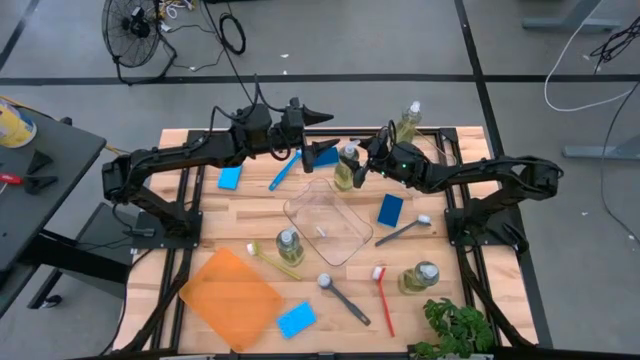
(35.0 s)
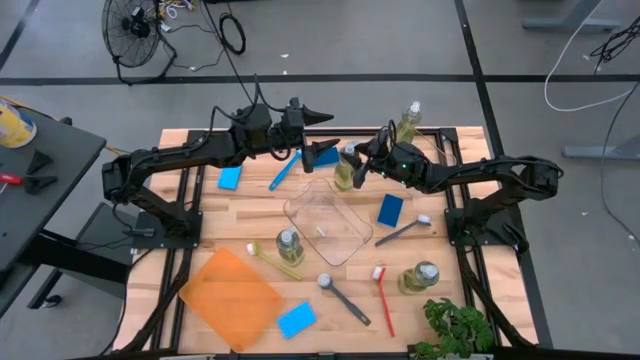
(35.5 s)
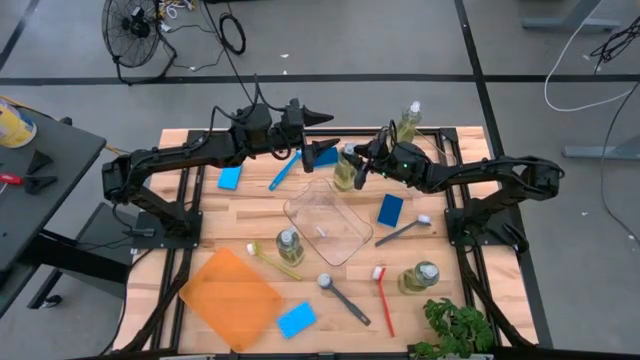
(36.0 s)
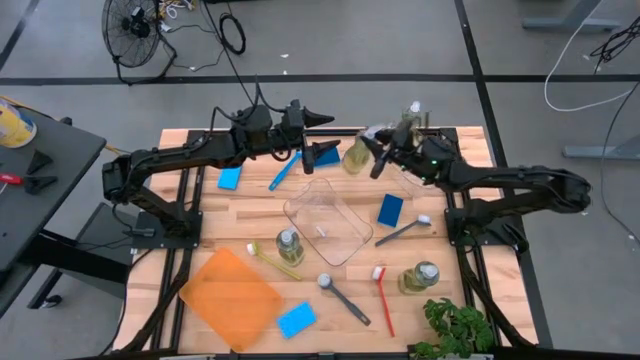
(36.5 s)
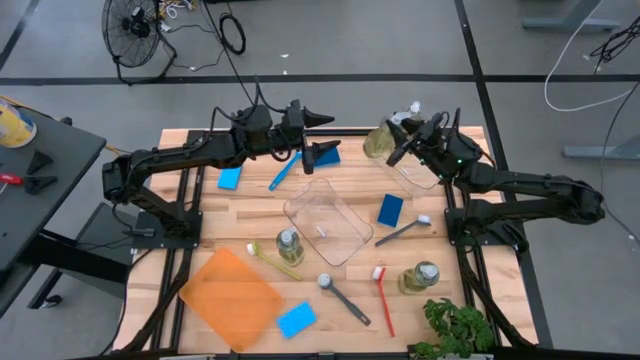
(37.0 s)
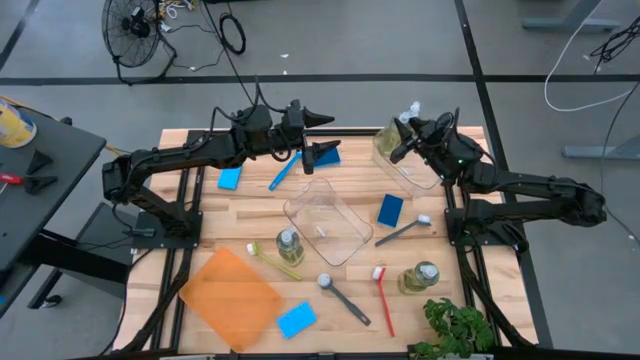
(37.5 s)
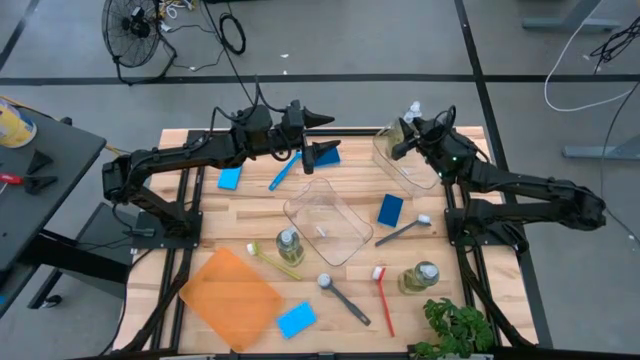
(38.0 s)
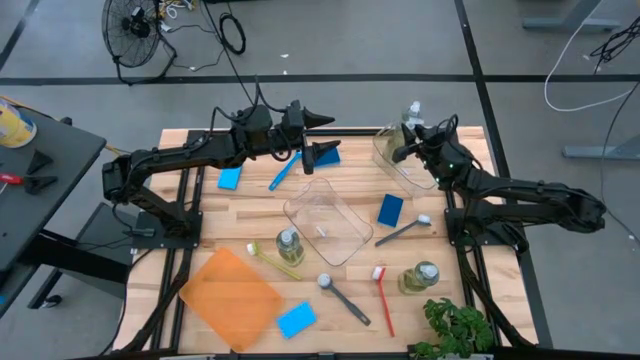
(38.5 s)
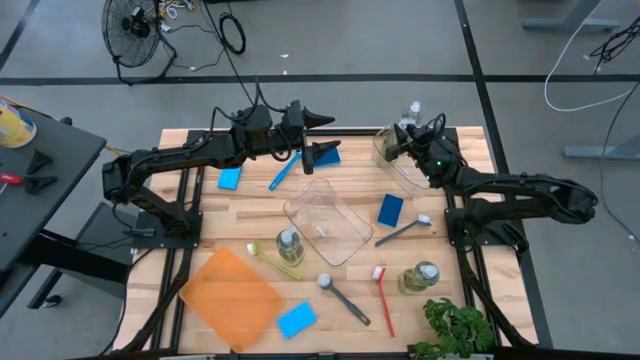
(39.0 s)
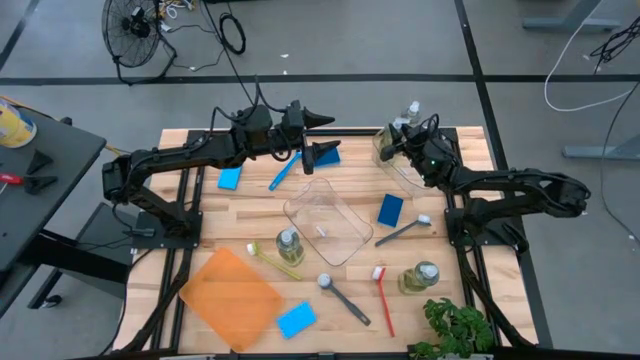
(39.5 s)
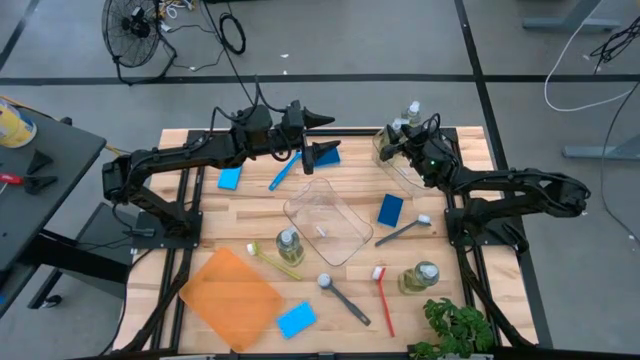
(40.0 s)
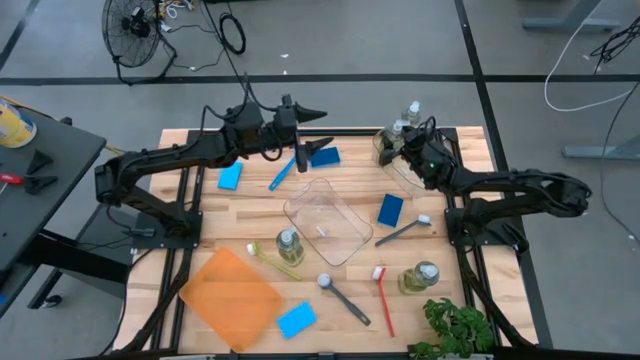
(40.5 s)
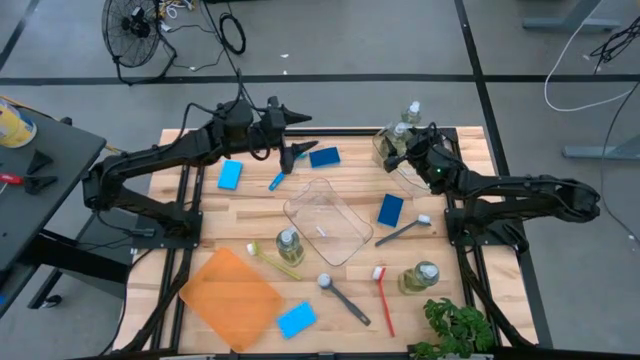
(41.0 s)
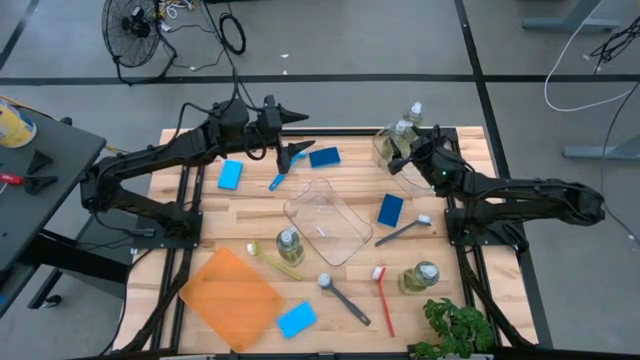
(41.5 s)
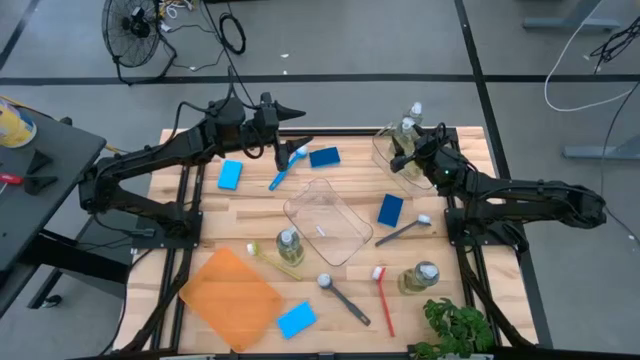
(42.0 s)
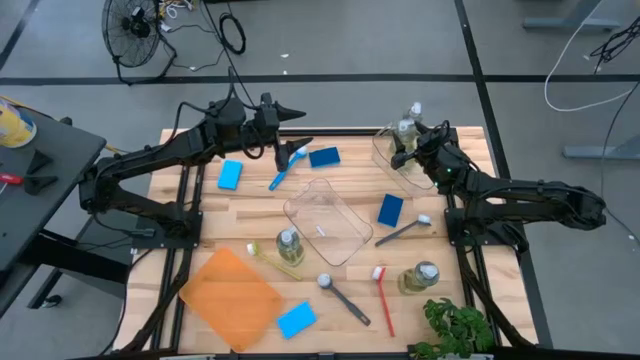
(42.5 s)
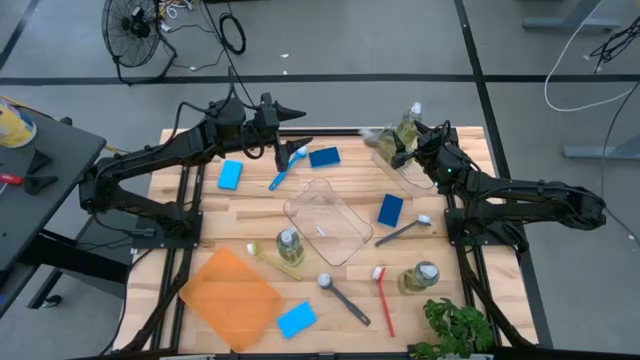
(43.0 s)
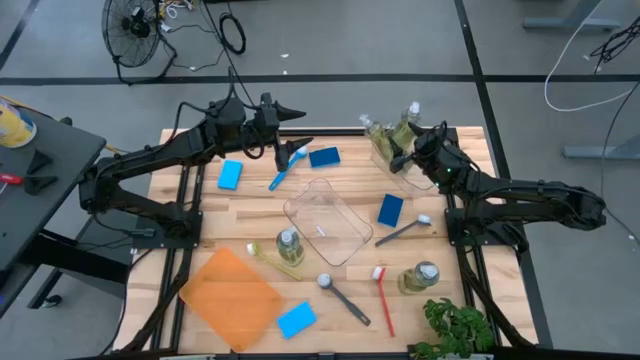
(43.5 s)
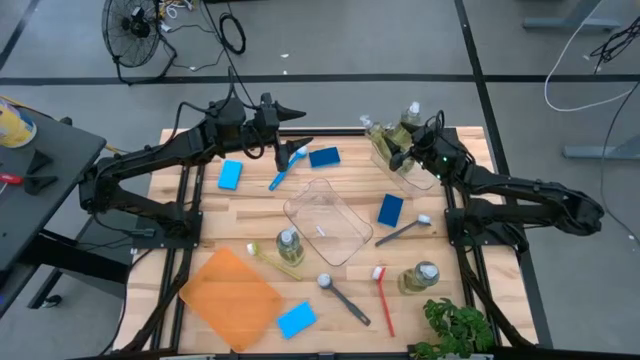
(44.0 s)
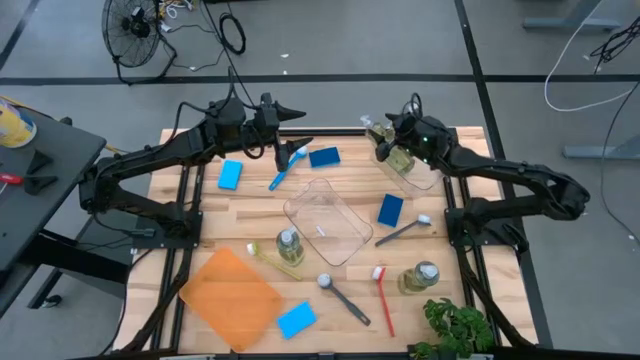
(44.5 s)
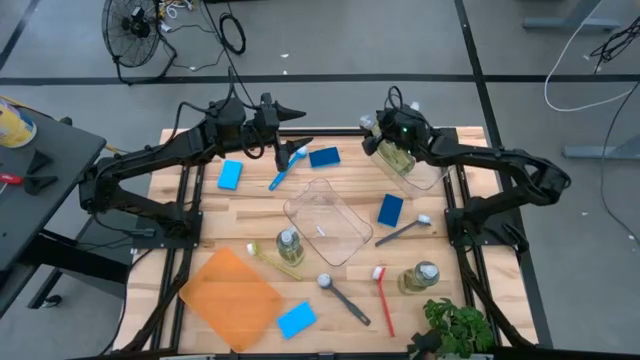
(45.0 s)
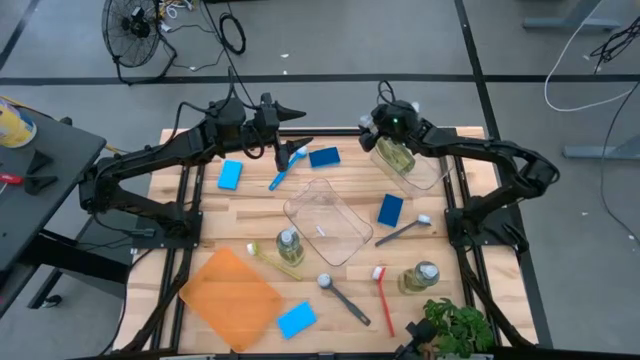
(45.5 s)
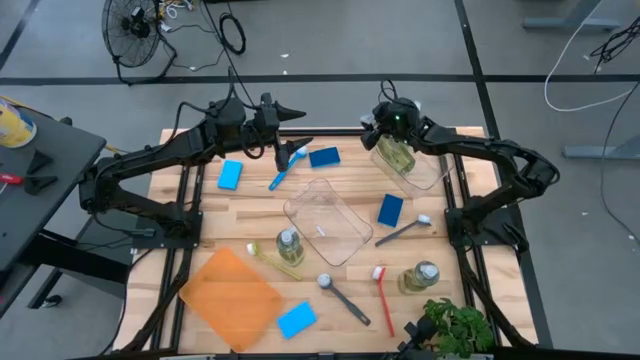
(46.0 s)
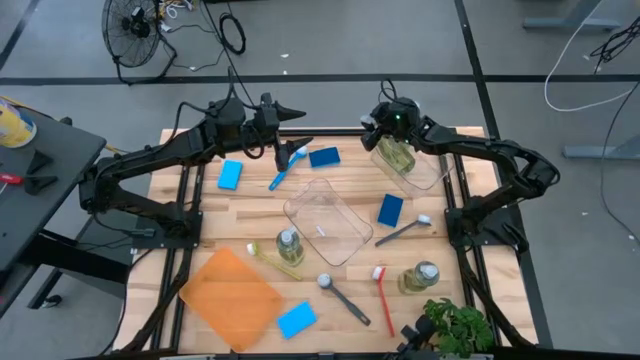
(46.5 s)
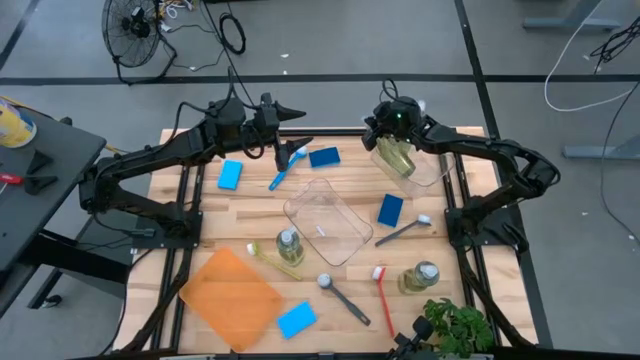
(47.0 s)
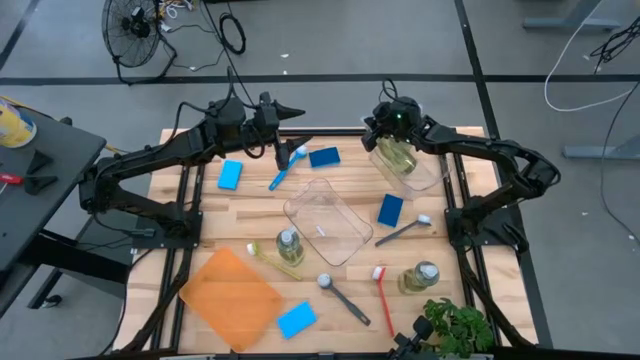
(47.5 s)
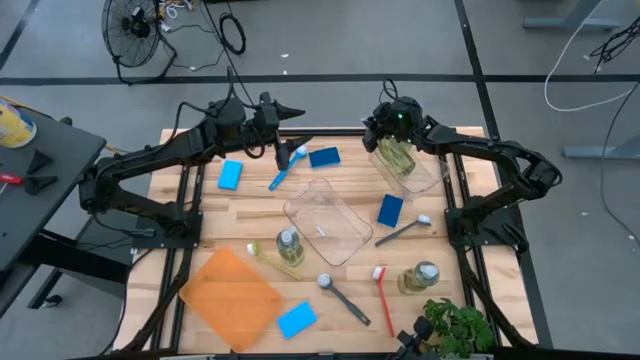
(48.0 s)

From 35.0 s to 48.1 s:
Task: Pick & Place Kitchen Sink Supplies
Put the yellow dish soap into the top transparent bin

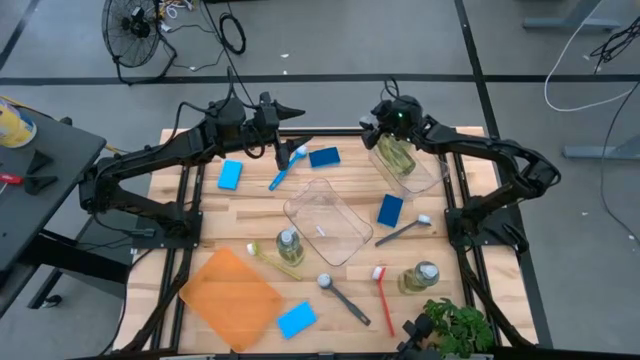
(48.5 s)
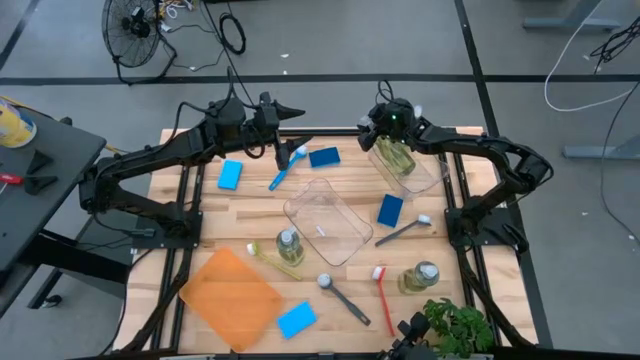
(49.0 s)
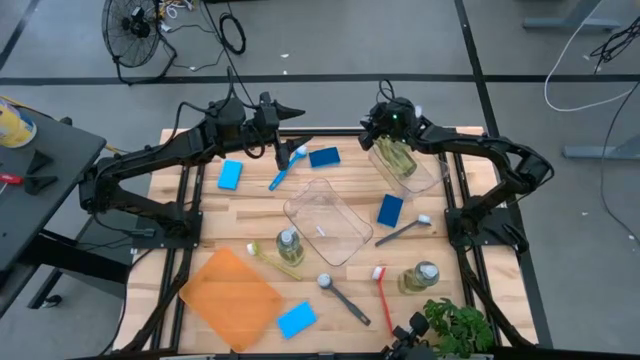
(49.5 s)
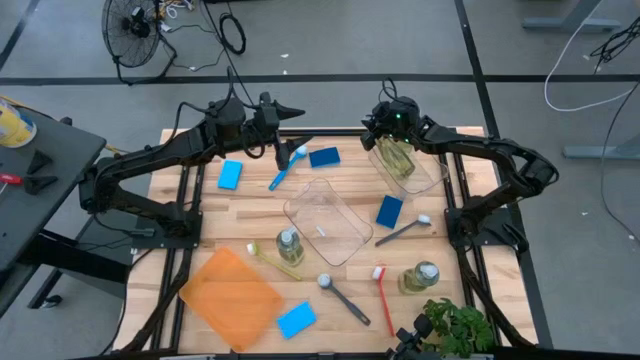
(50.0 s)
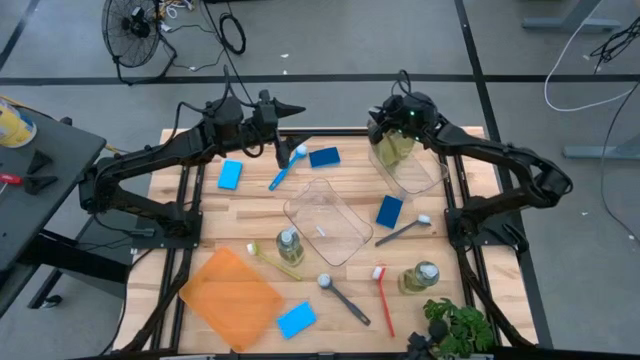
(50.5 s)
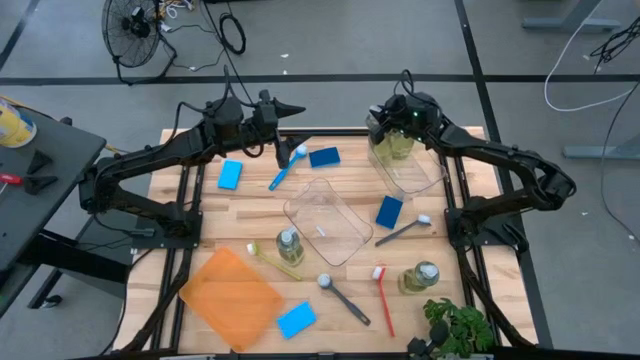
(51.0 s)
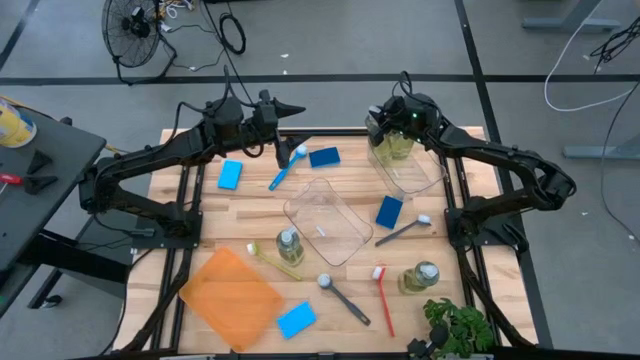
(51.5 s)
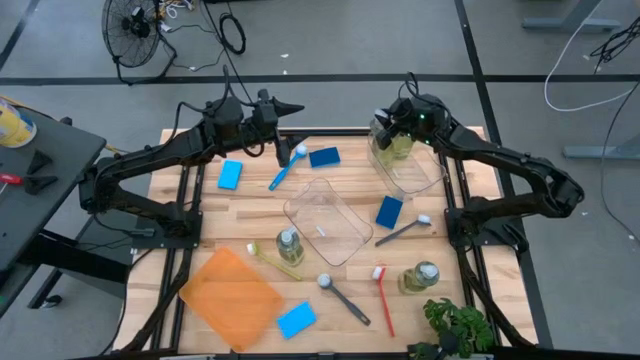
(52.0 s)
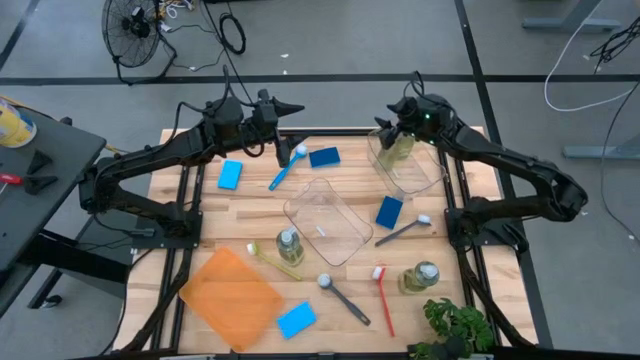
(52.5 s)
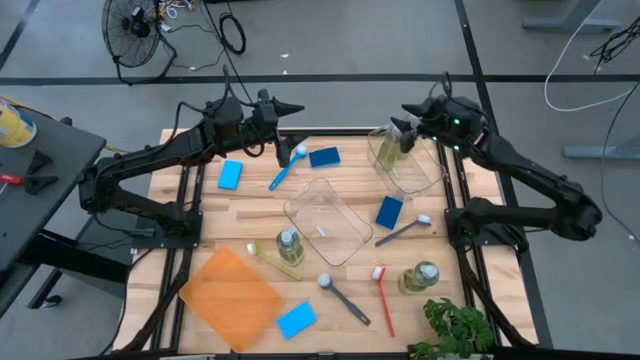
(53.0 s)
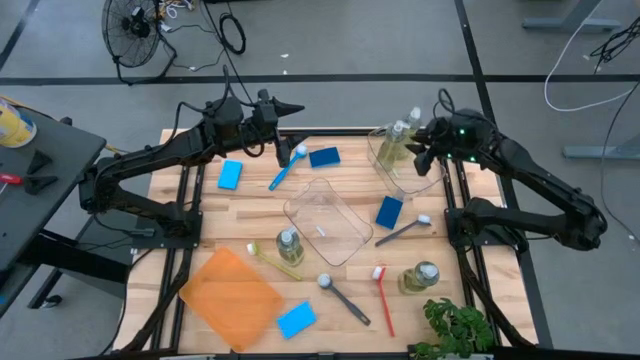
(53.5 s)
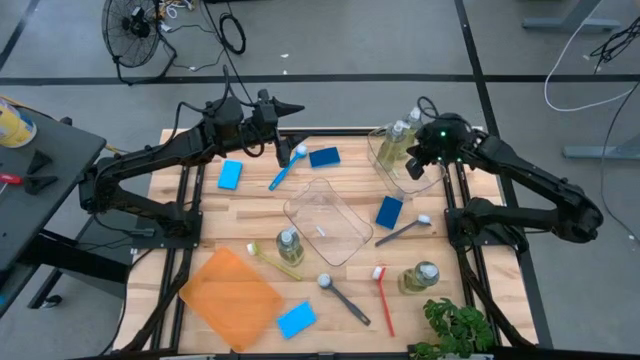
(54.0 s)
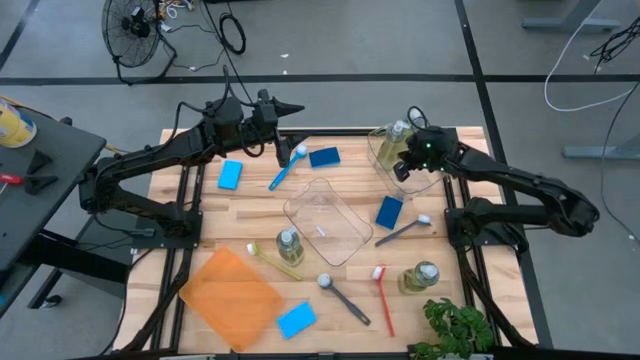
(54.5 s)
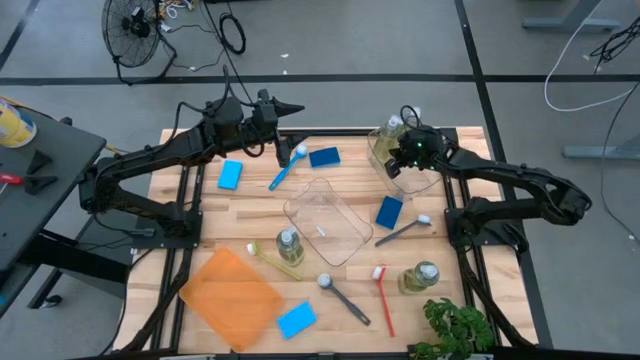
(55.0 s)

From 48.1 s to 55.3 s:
Put the yellow dish soap into the top transparent bin

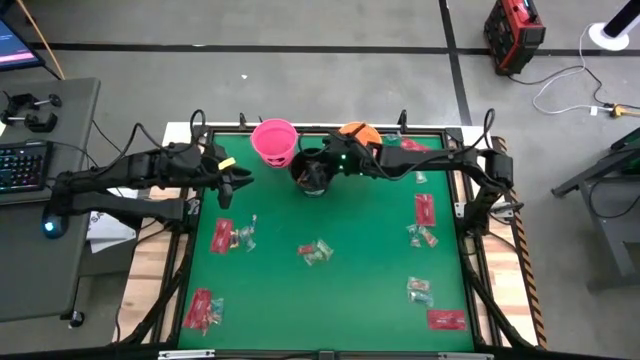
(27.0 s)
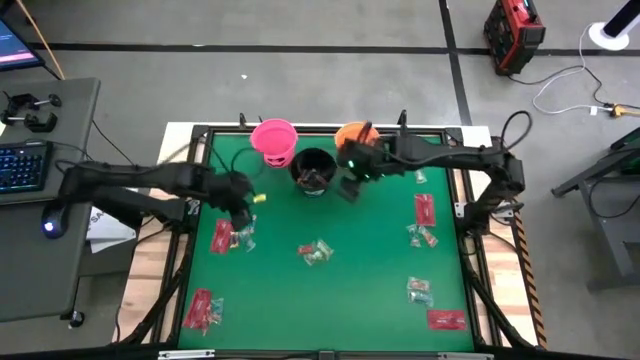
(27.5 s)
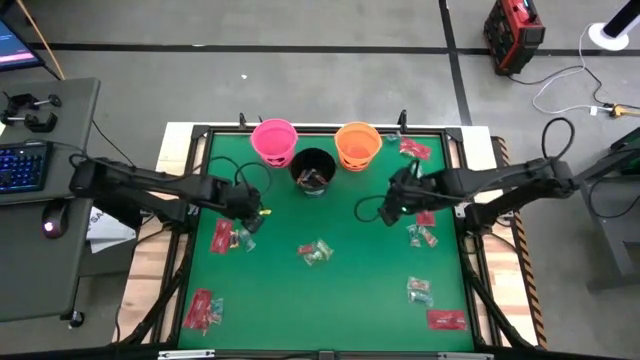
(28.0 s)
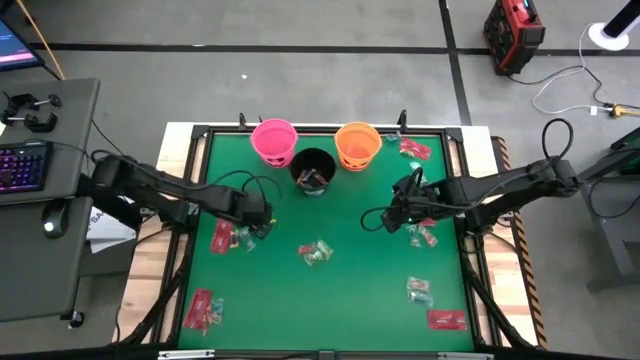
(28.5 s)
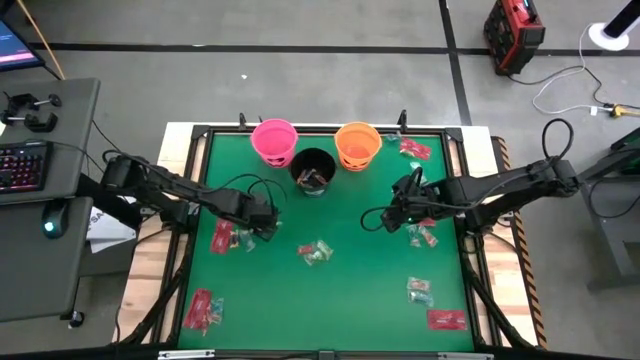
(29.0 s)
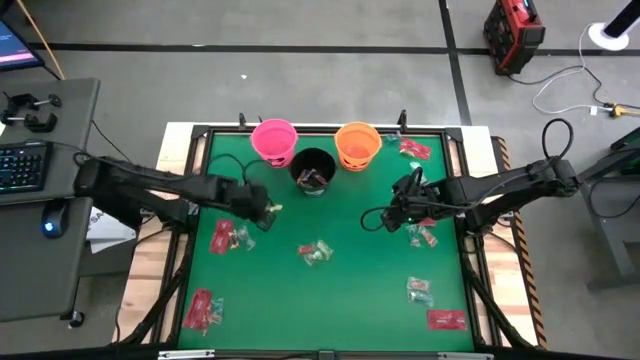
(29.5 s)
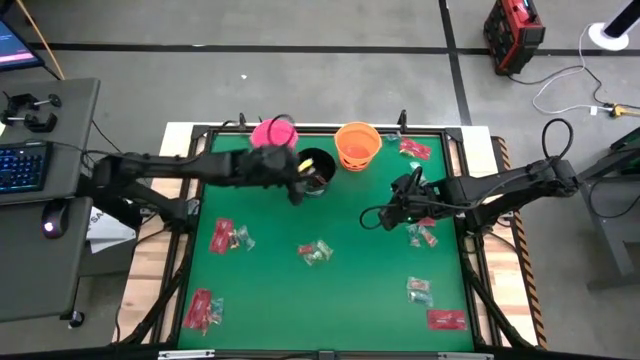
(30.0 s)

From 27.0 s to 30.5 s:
Task: Sort candy by brand, put in halloween buckets
Put the blue candy into the black bucket
